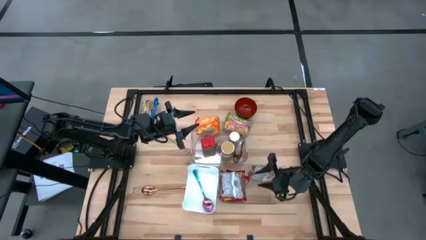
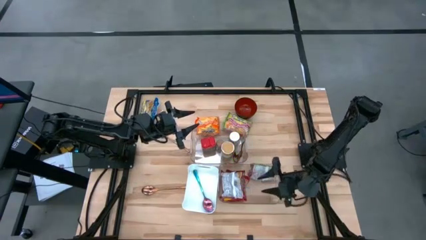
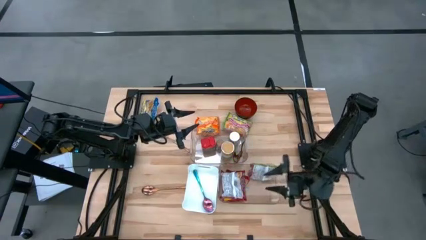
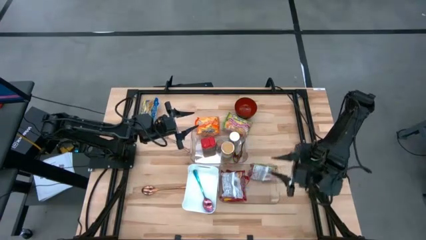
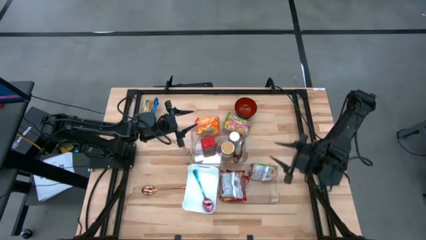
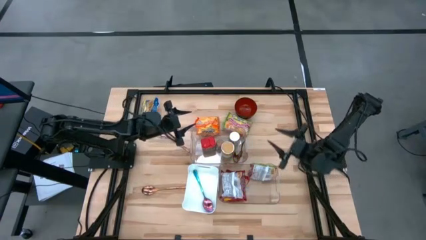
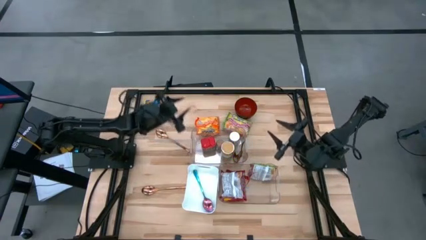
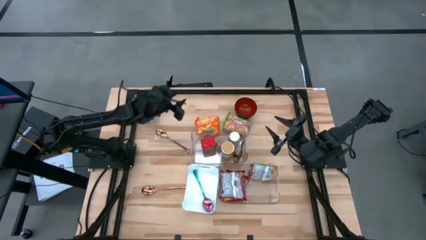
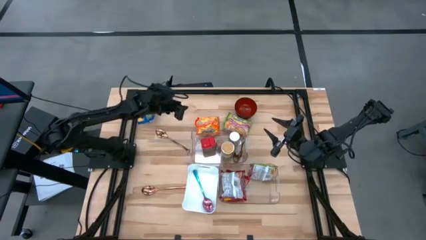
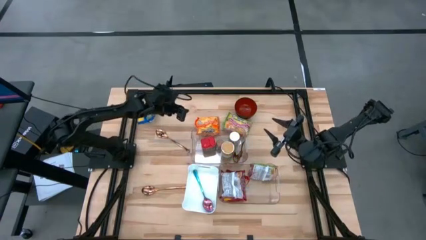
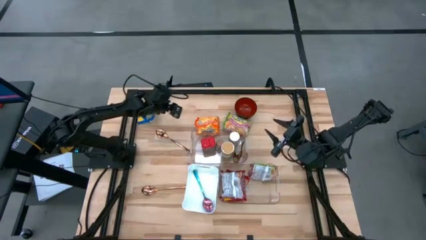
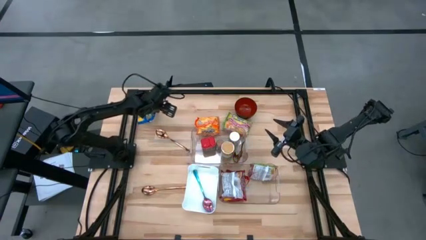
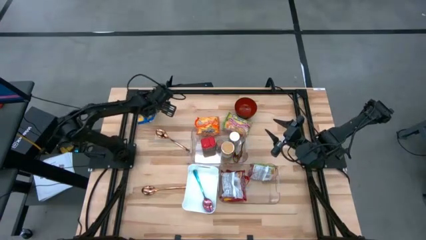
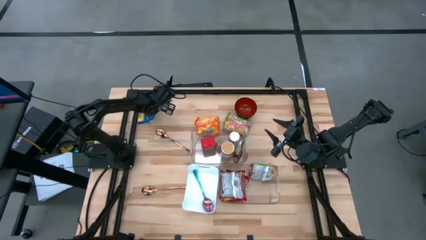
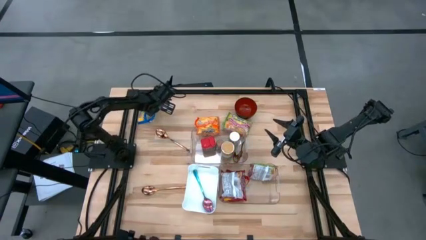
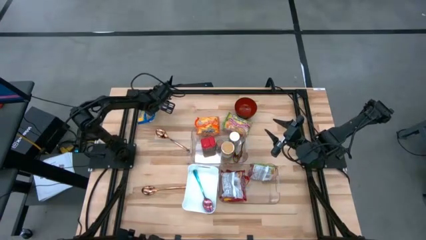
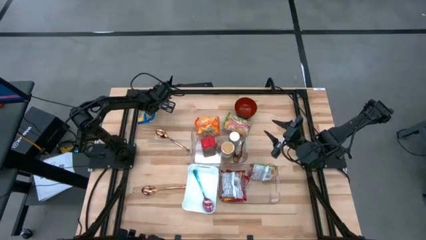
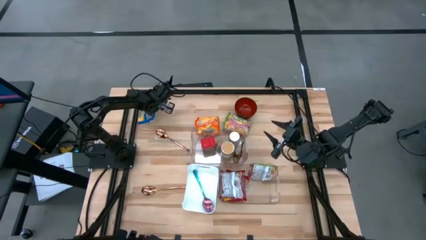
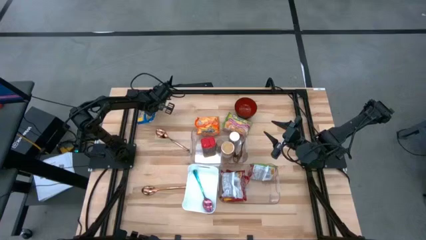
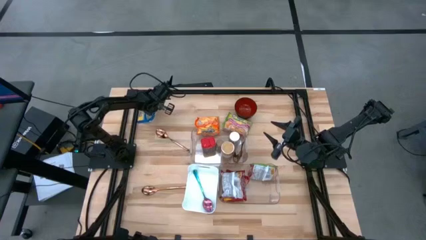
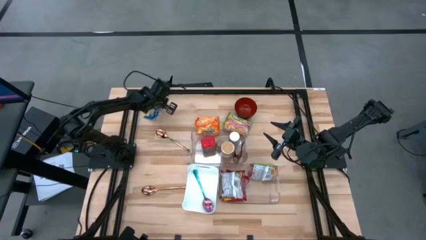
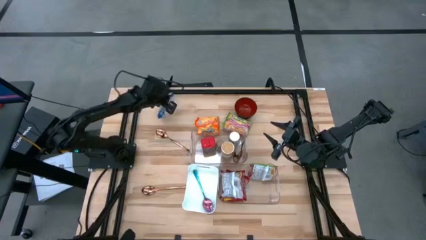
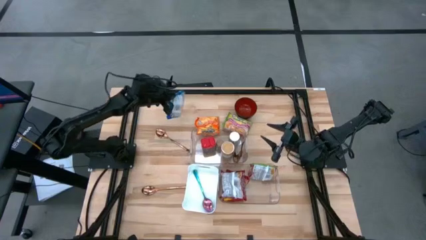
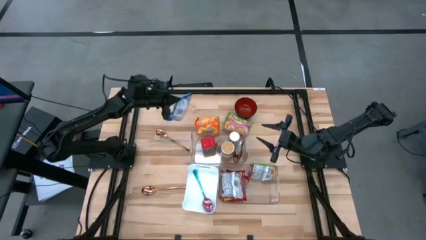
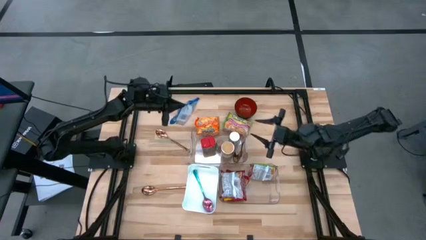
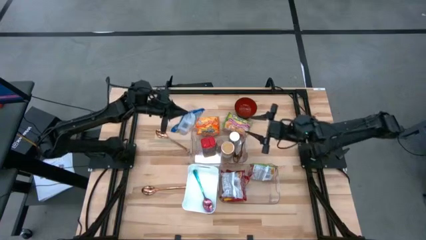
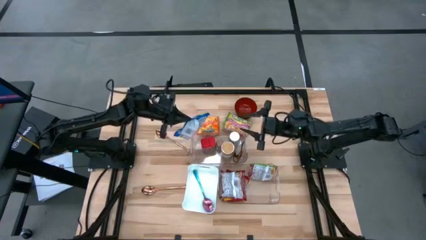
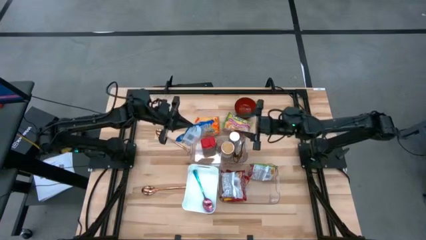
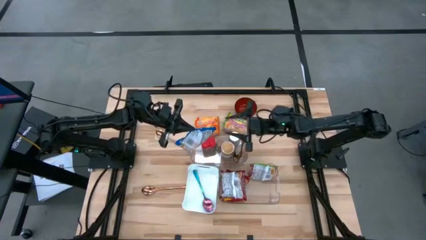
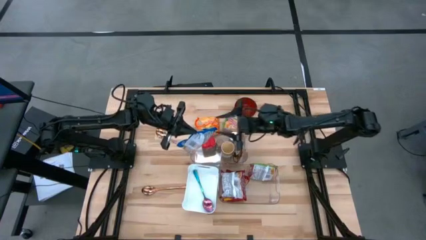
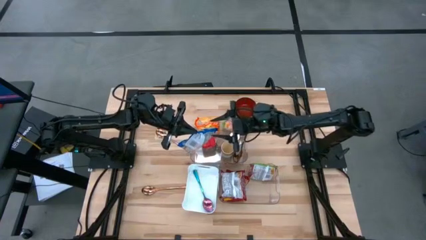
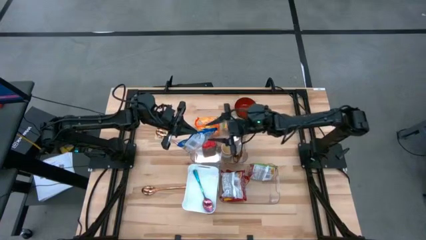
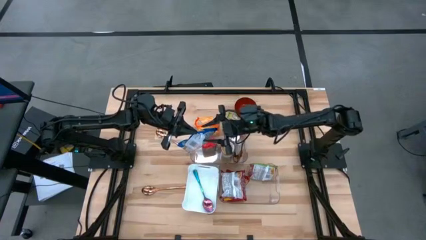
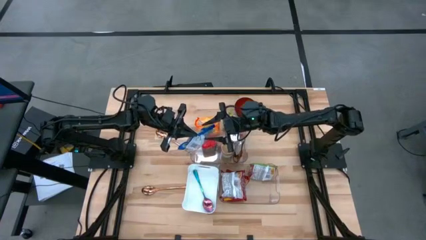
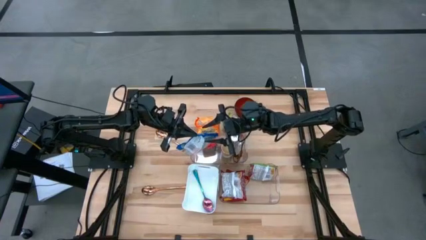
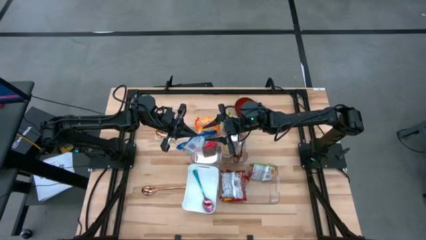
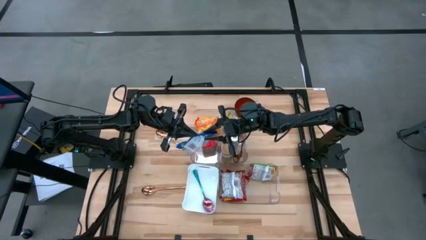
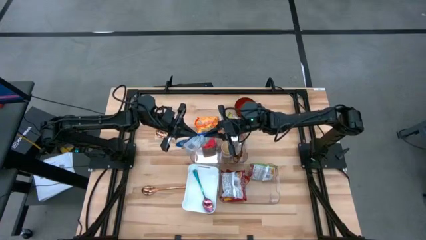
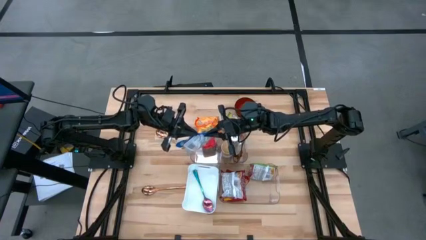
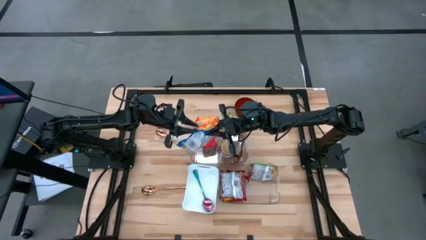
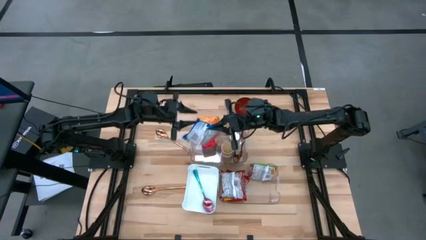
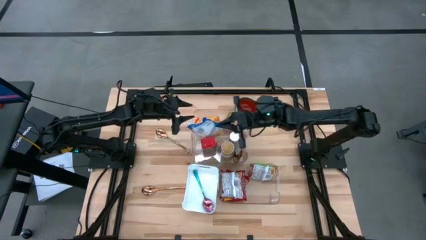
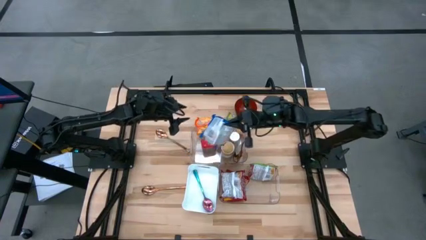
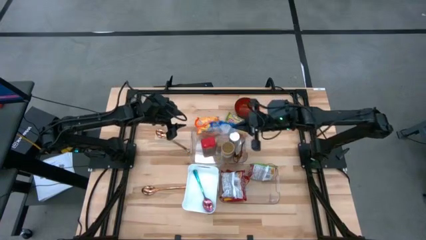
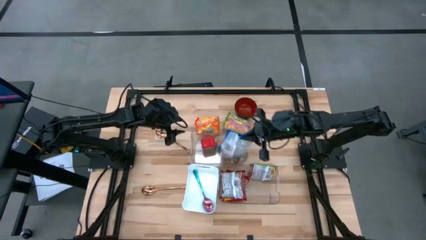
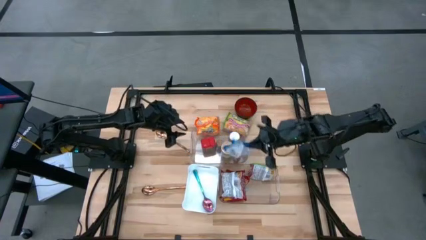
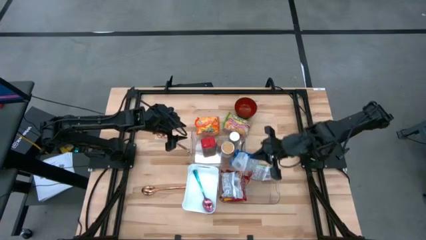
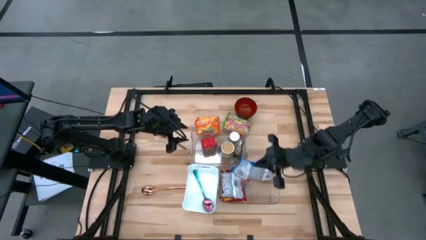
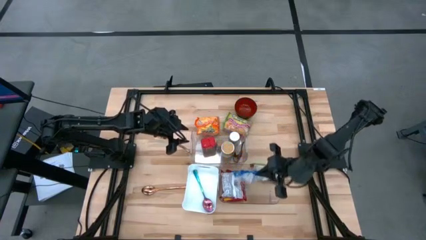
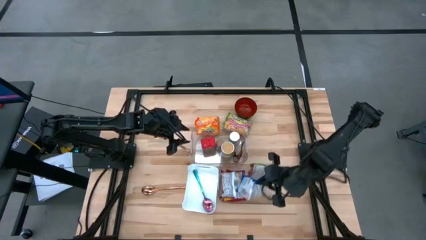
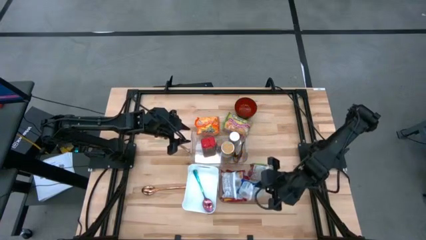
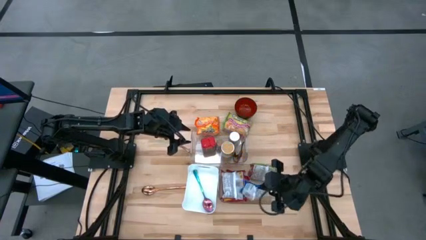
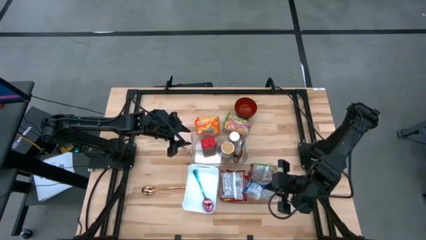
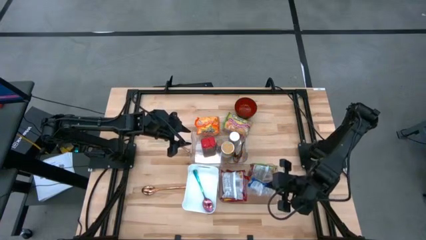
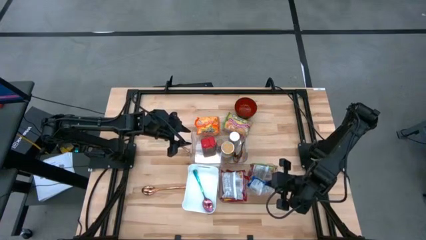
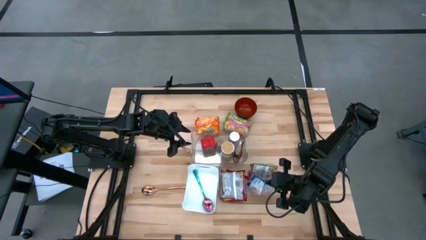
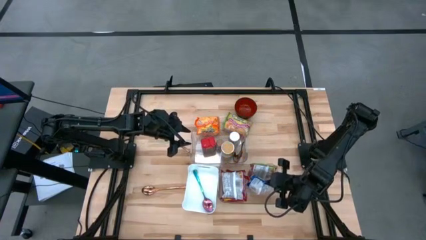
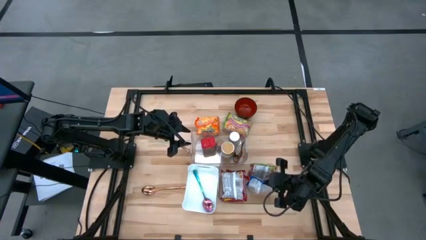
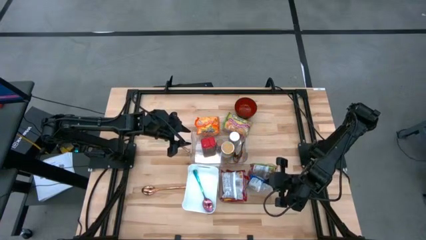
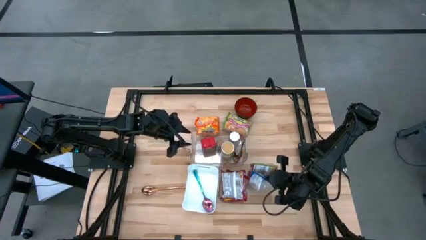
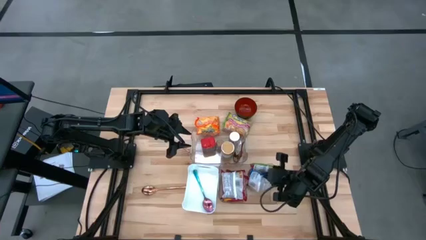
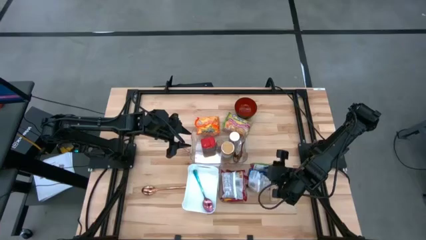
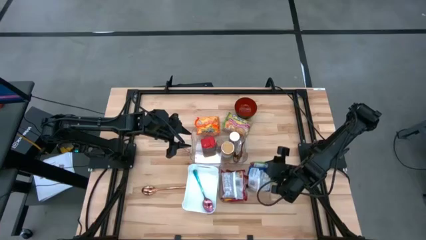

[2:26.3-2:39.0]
Task: Pick & Place Food Item
Put the blue noodle pack into the bottom transparent bin

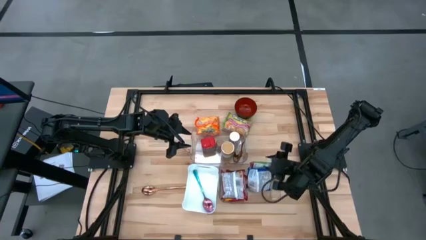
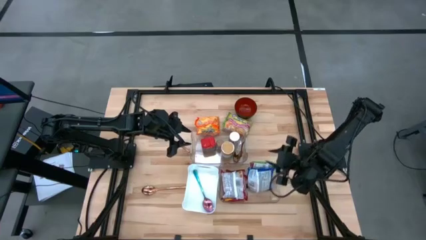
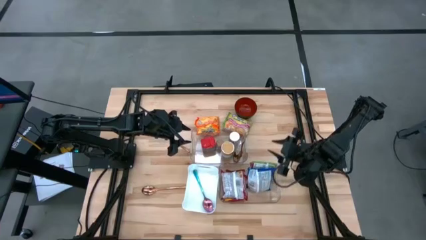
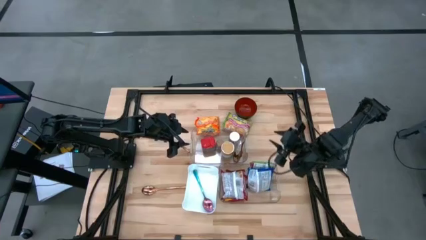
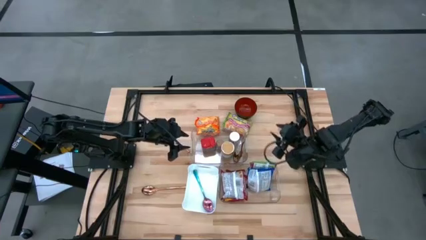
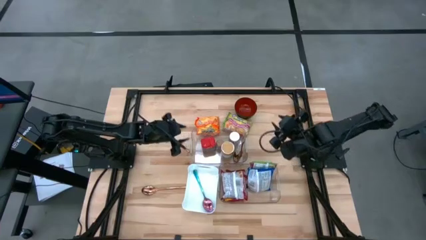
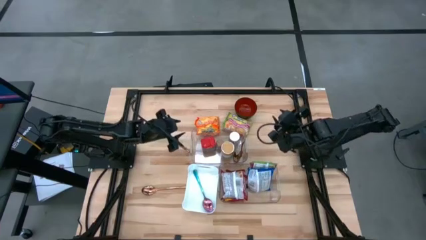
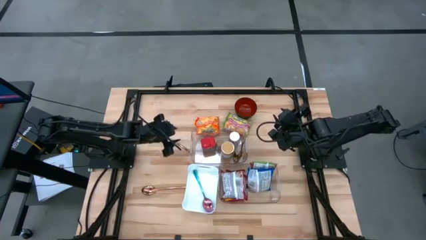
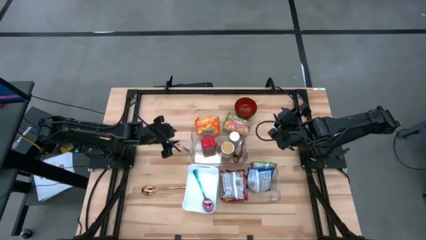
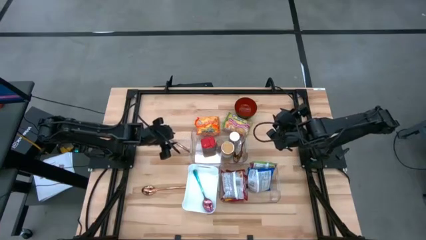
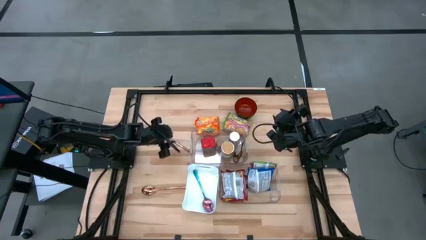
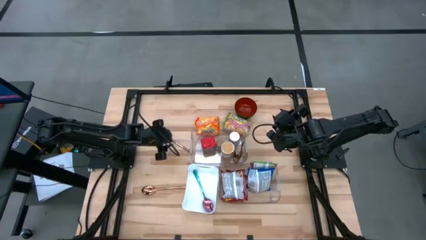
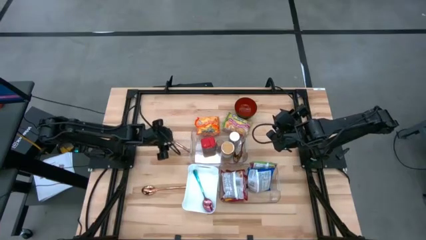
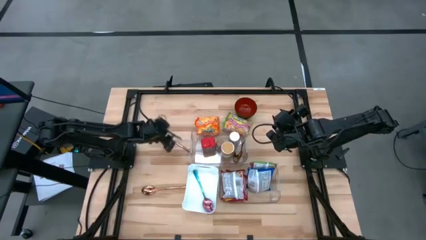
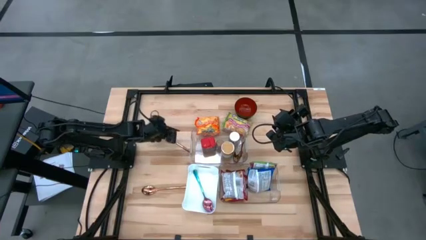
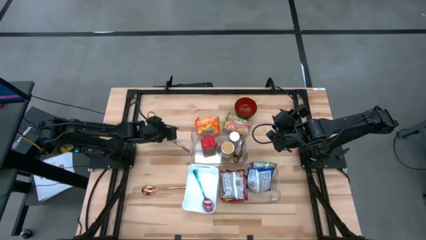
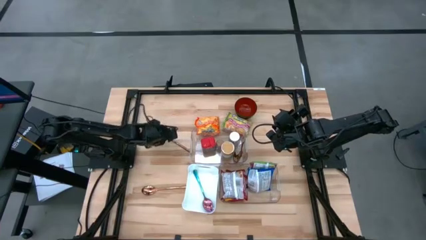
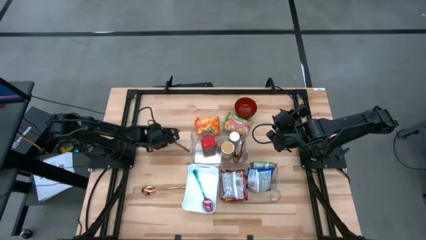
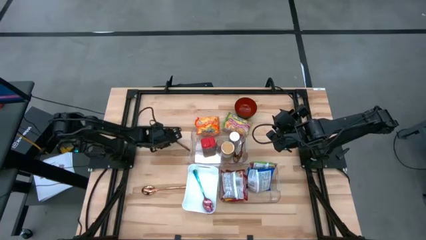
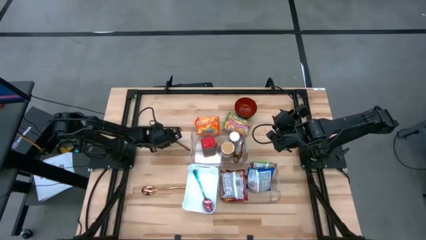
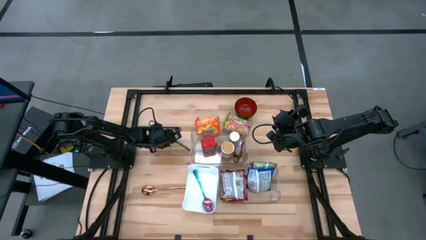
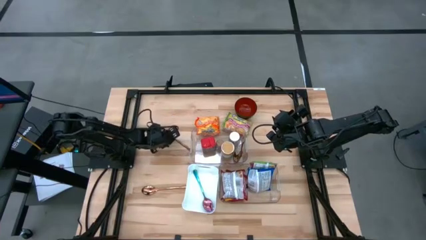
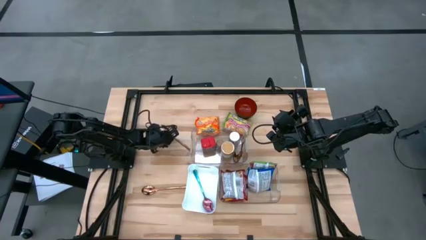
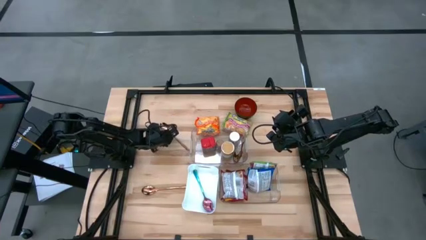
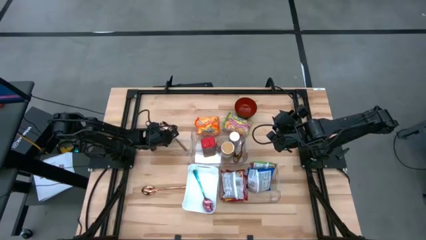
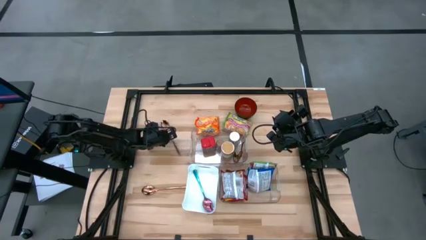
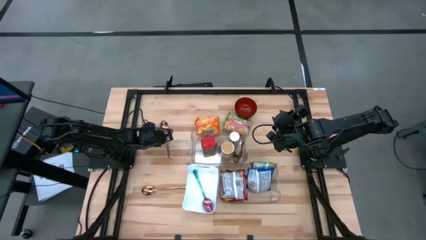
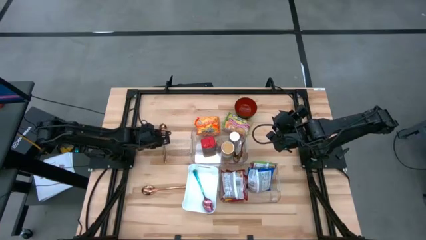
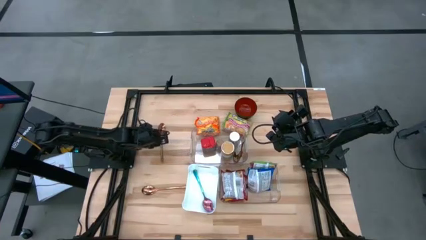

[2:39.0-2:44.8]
Put the top gold spoon into the white bin
